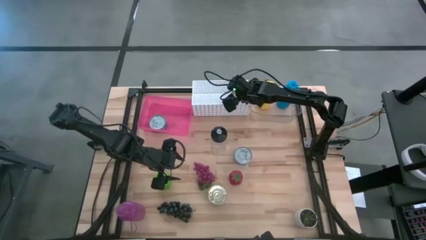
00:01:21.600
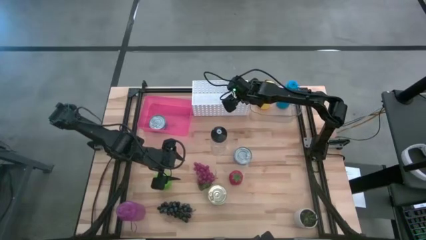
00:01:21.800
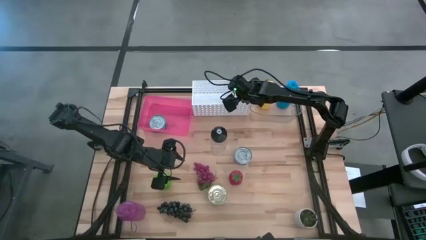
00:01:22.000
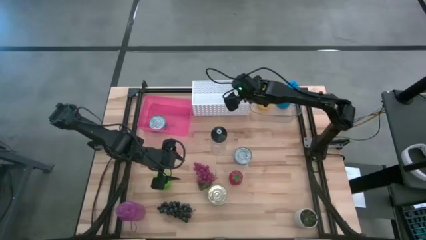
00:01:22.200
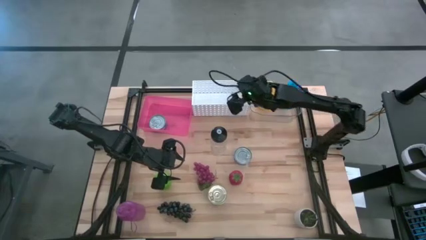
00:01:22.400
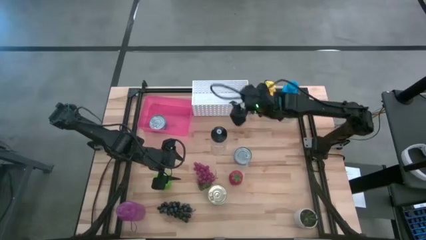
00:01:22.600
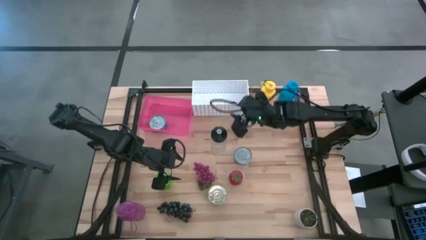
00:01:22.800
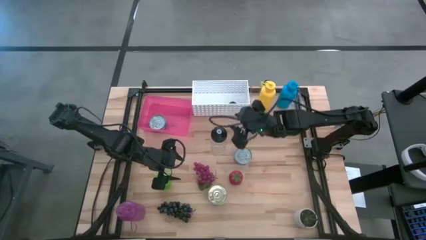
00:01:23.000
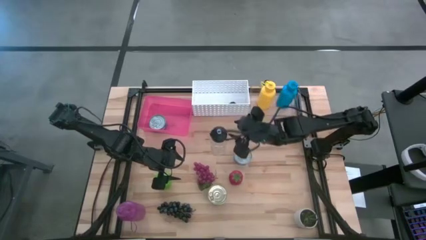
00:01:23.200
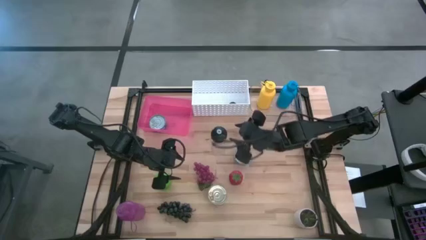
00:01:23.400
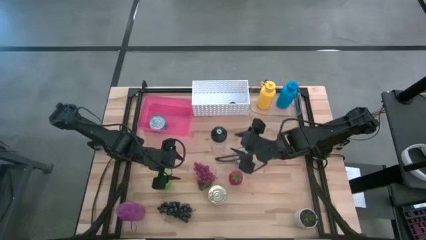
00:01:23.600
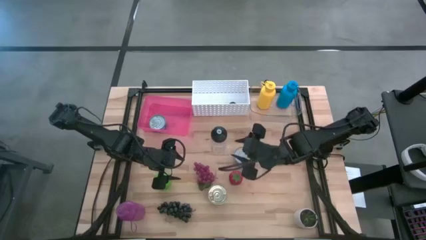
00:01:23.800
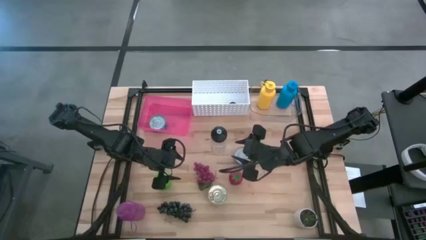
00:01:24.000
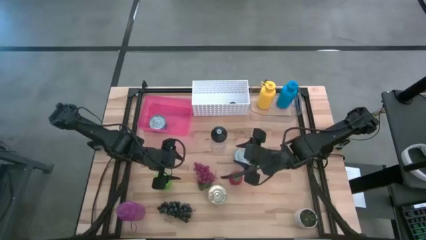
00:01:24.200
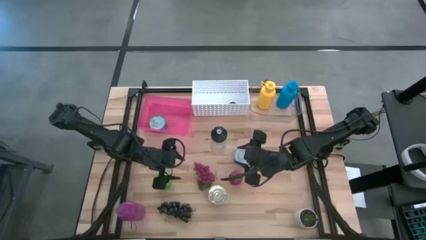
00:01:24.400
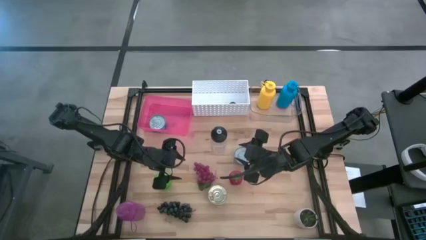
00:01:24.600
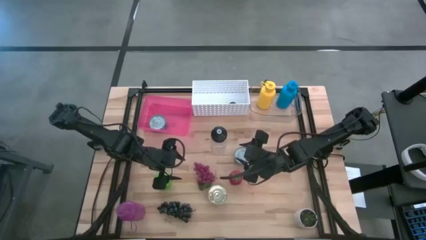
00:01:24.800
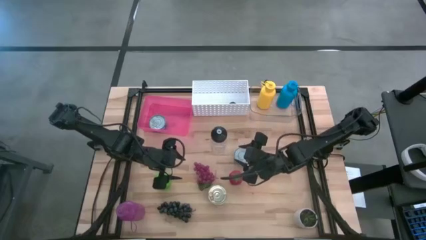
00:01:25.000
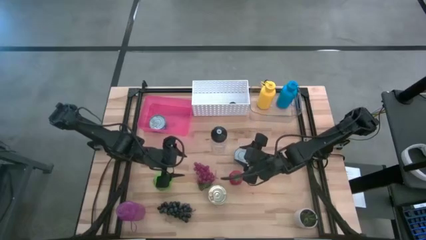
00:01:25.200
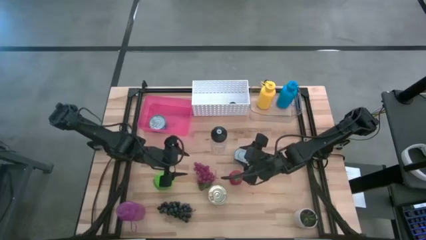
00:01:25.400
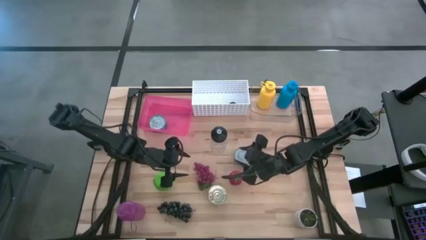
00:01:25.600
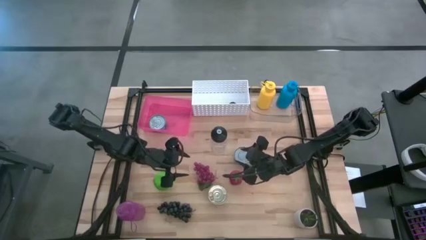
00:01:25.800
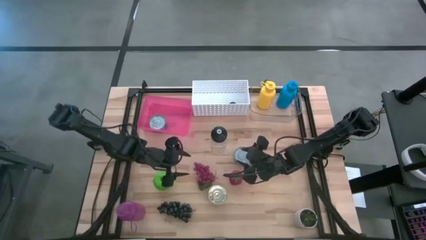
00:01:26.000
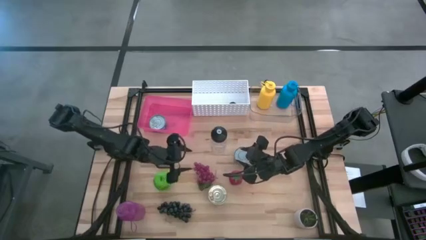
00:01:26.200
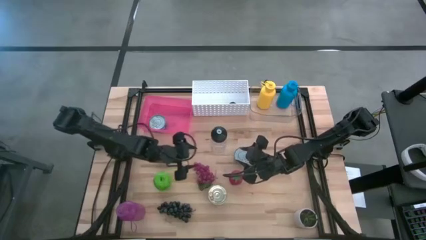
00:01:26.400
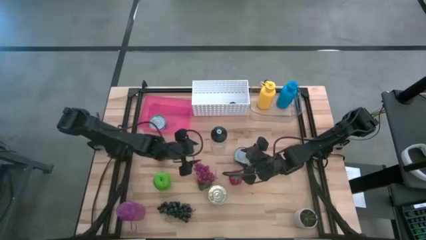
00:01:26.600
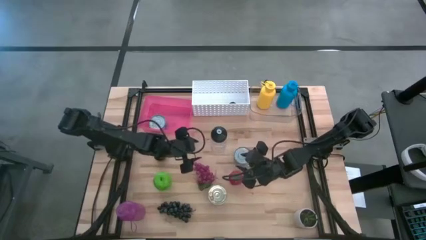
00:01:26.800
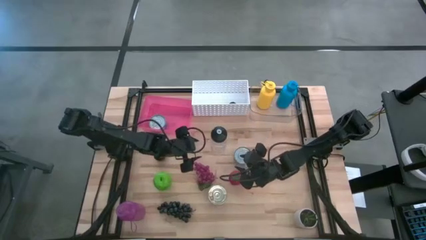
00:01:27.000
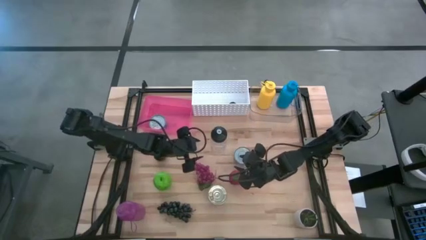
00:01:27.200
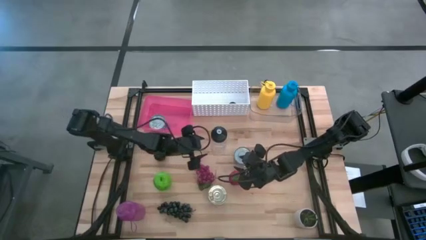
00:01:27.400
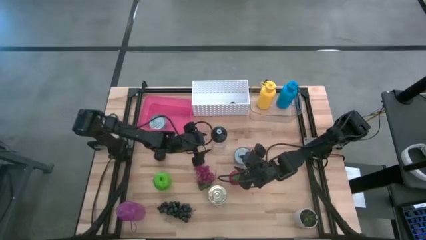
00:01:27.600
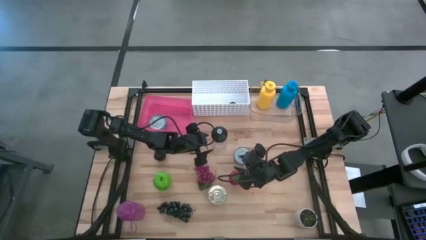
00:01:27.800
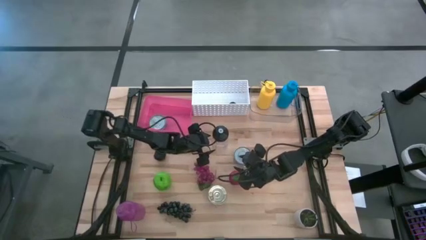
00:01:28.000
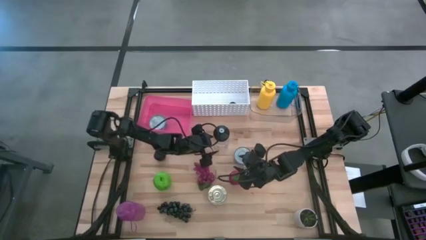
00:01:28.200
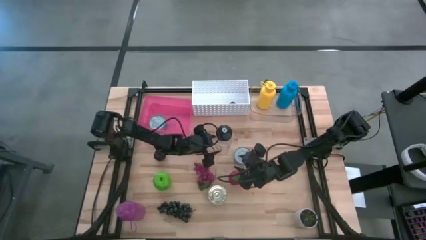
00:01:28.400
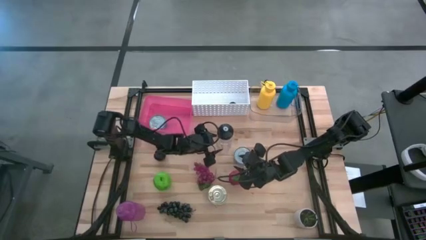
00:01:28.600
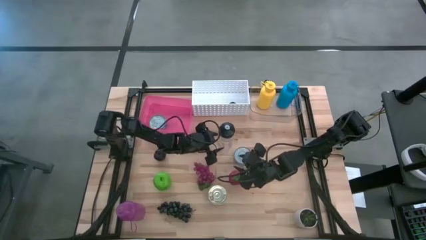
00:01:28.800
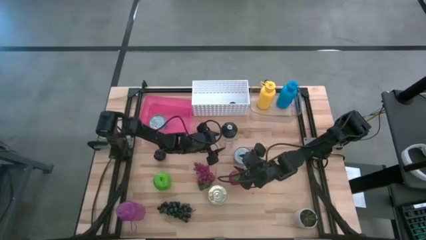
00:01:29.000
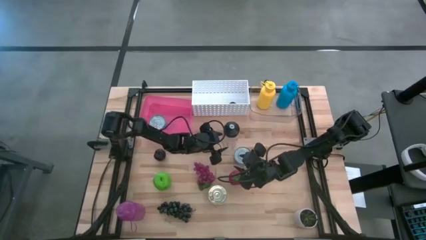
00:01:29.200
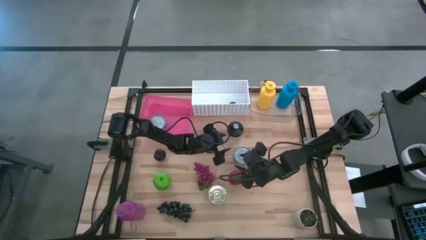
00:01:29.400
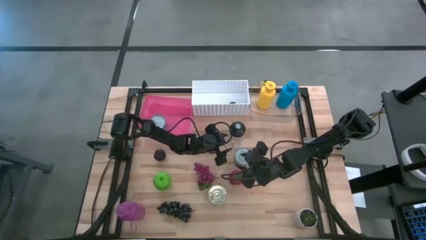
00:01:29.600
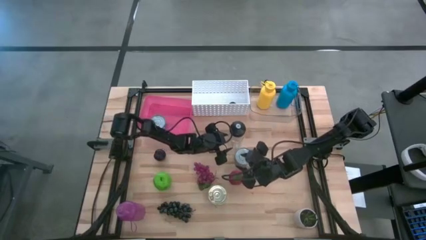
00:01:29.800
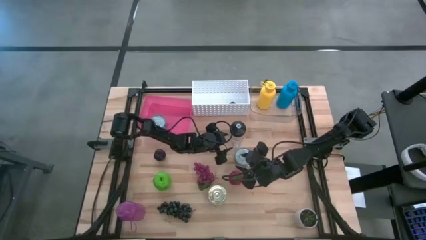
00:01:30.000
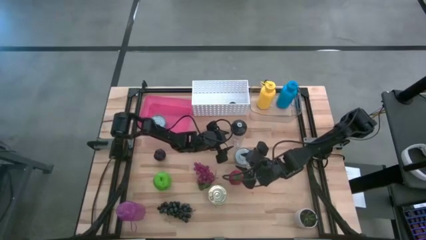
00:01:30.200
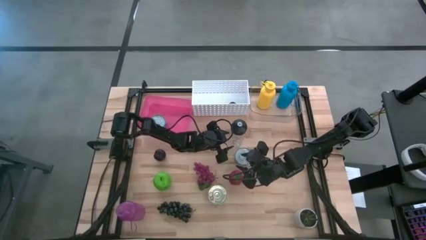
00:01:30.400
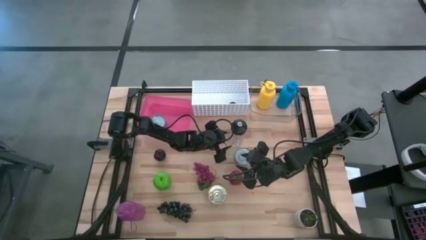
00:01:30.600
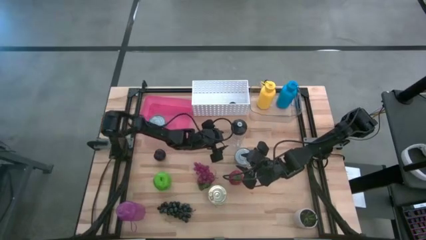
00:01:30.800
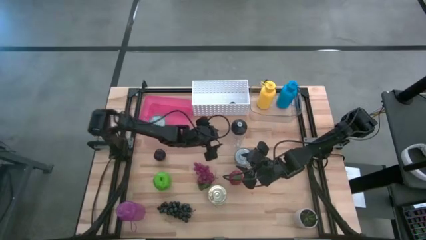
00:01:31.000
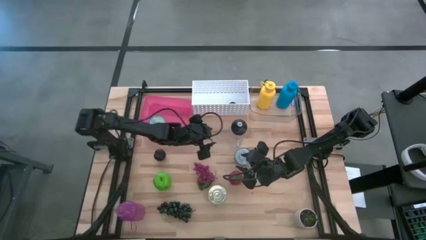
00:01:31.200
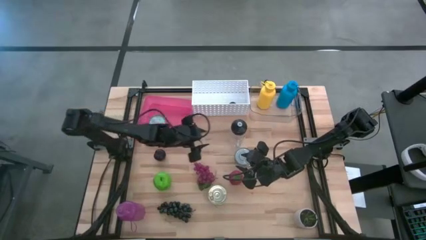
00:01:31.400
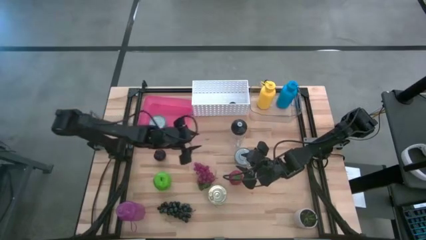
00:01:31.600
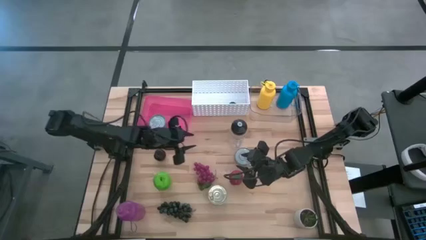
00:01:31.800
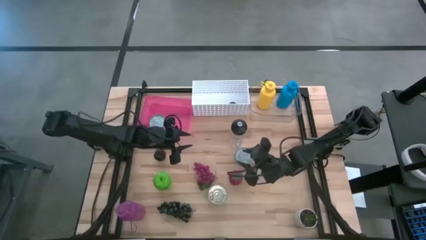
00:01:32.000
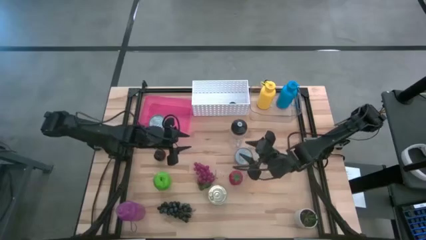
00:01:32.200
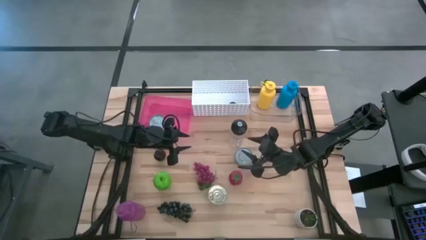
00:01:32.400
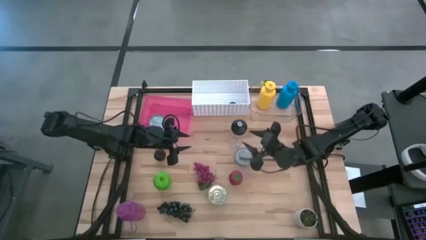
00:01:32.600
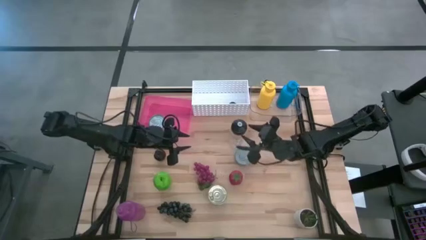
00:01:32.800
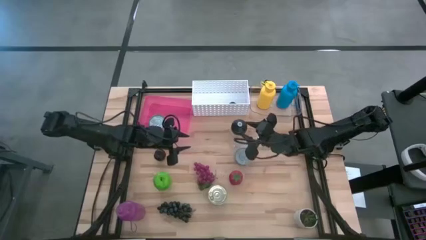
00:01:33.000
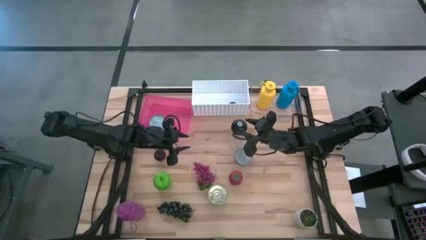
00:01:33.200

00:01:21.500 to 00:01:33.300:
Task: Pick & Place Food Item
Put the transparent water bottle into the transparent bin

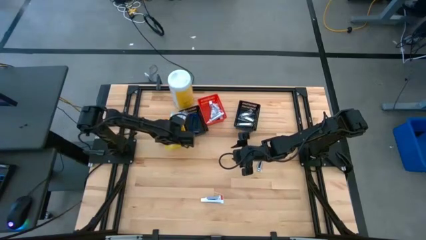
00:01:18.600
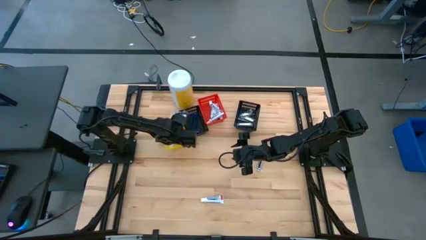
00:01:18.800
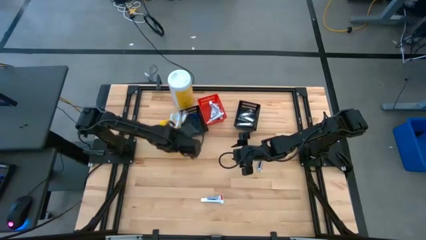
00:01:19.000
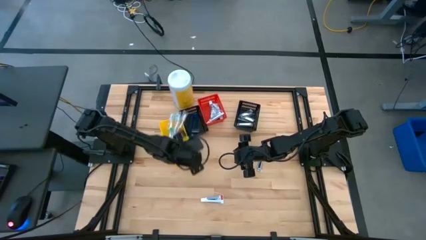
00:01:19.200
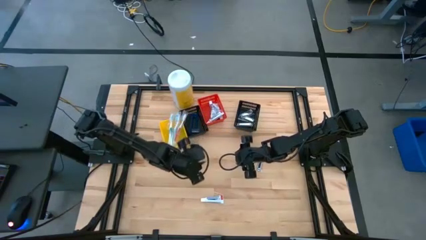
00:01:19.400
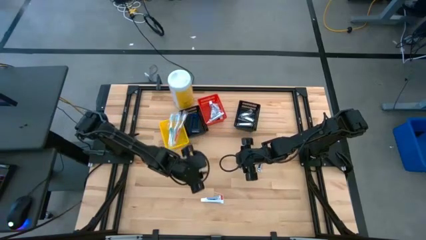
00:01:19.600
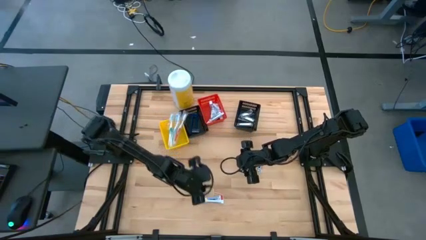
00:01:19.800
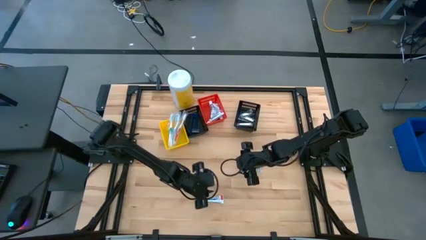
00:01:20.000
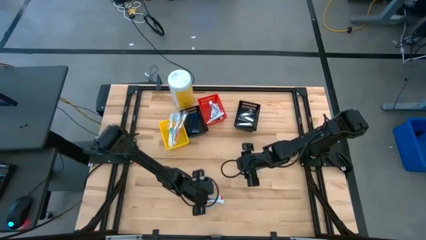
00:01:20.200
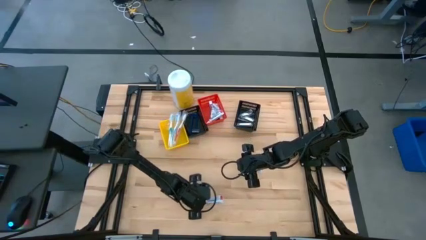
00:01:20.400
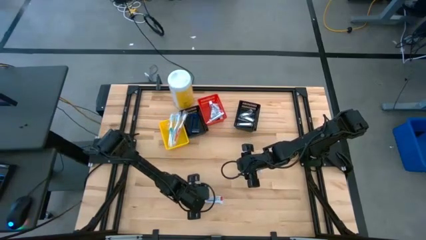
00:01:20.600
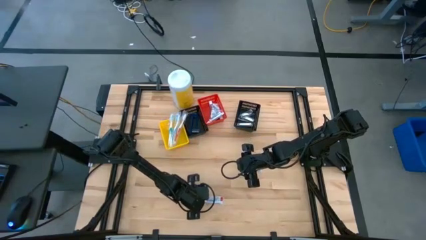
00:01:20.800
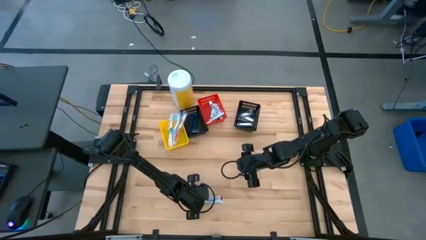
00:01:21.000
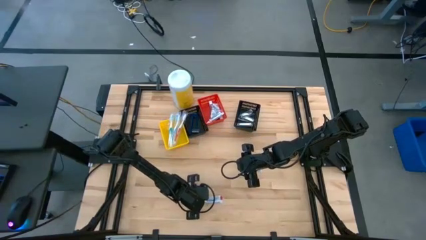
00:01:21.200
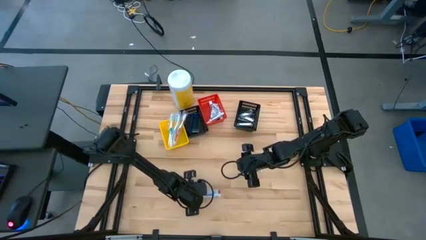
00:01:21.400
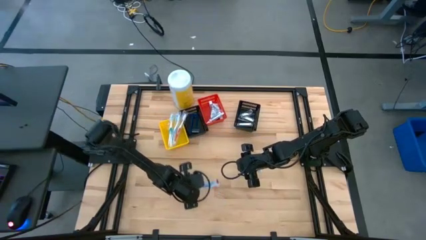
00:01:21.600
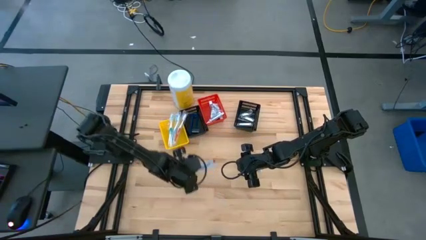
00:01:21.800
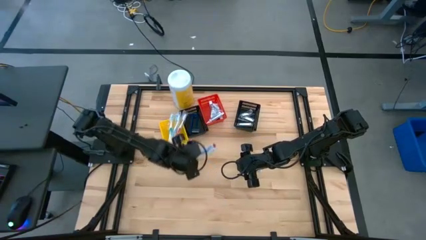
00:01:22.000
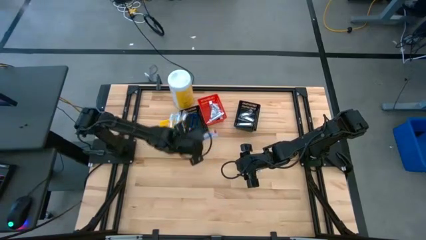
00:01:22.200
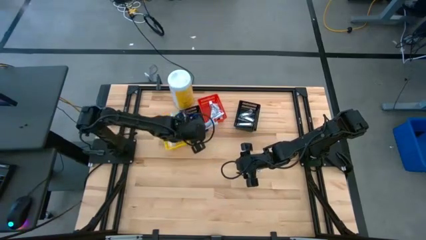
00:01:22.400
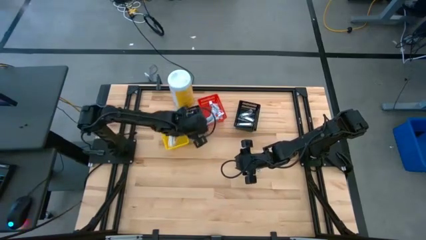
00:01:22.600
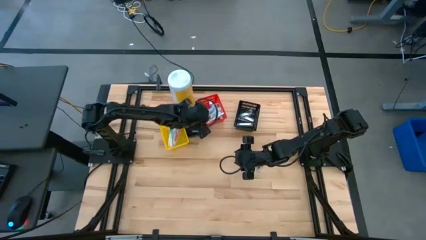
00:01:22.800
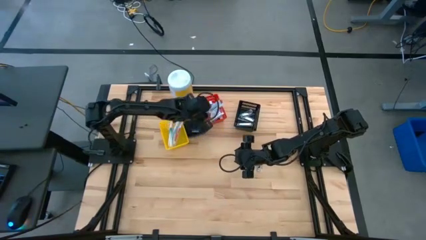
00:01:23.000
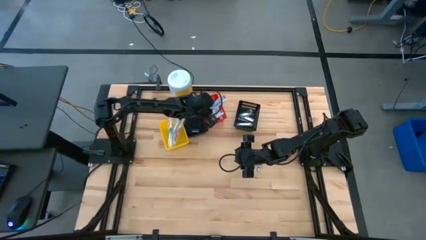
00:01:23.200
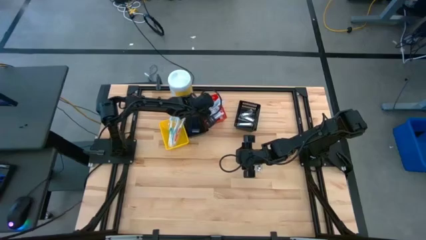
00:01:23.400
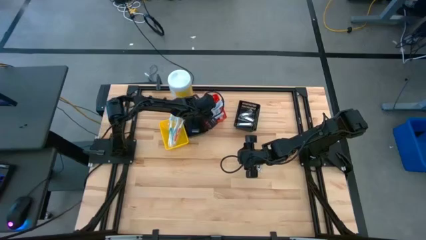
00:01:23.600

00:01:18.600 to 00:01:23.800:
Task: Pick & Place Travel size toiletries
Put the white toothpaste into the red bin
